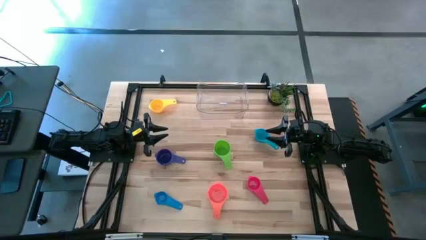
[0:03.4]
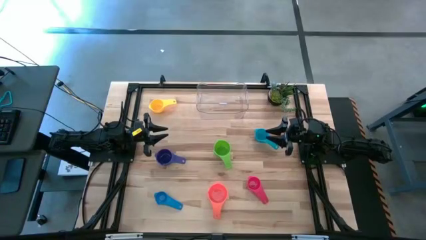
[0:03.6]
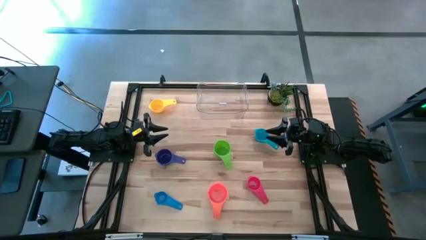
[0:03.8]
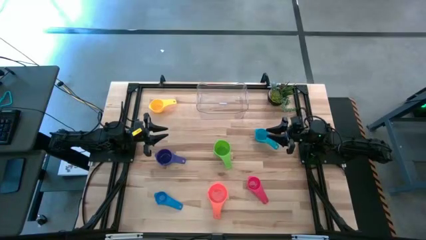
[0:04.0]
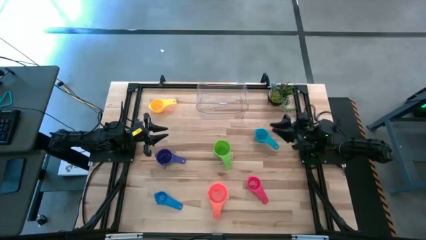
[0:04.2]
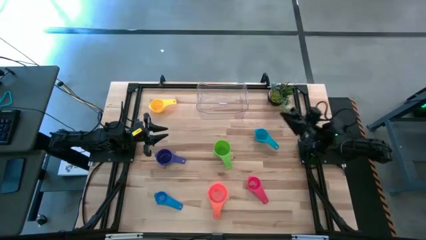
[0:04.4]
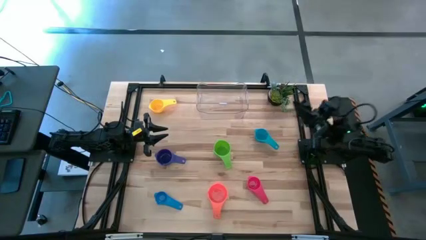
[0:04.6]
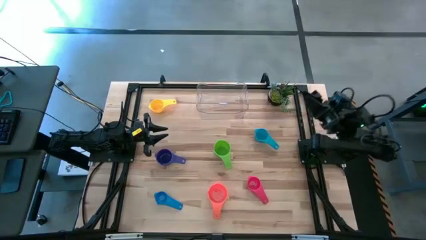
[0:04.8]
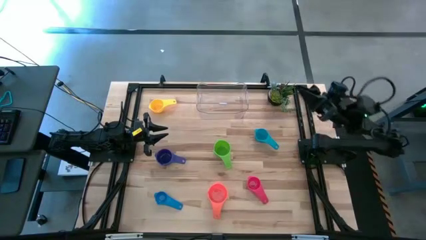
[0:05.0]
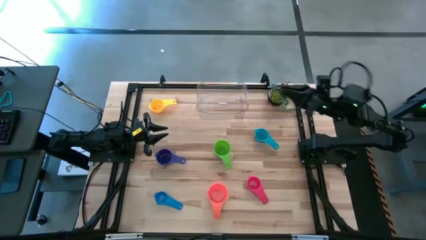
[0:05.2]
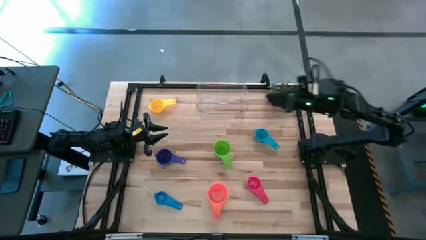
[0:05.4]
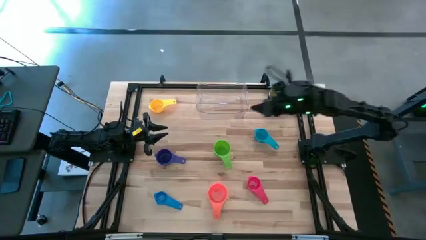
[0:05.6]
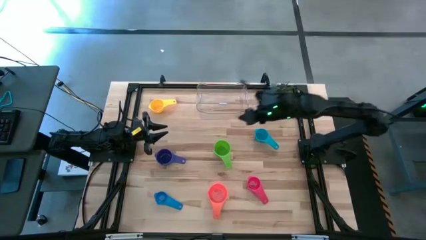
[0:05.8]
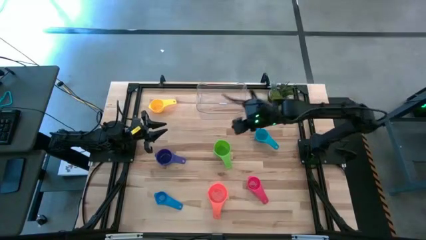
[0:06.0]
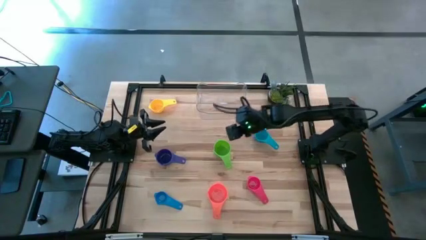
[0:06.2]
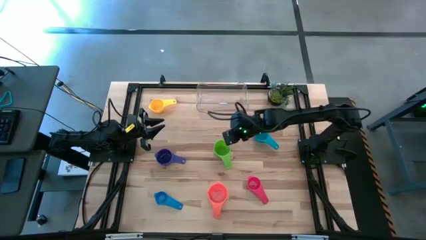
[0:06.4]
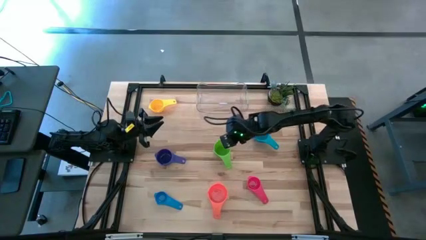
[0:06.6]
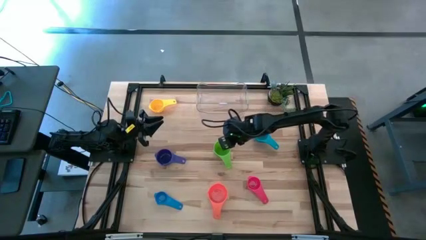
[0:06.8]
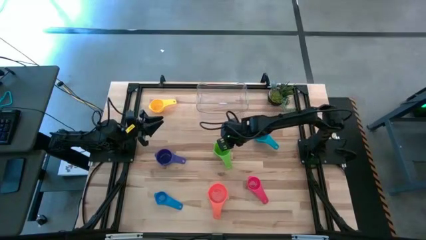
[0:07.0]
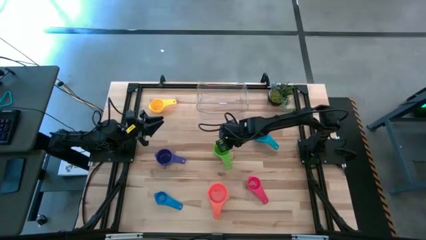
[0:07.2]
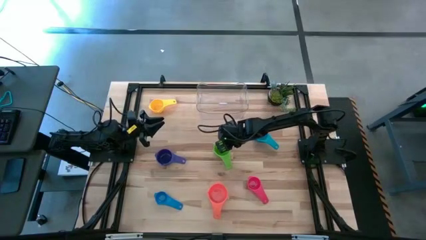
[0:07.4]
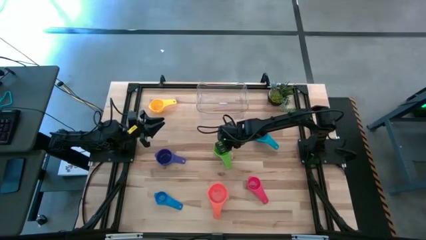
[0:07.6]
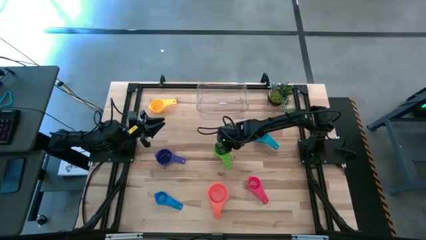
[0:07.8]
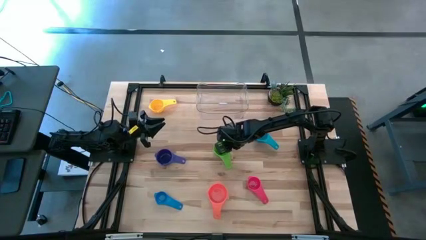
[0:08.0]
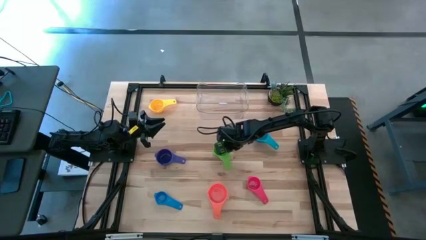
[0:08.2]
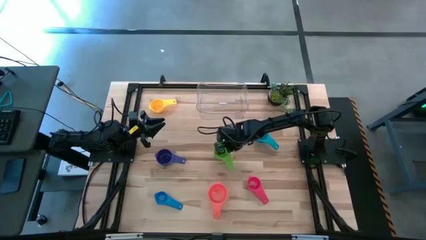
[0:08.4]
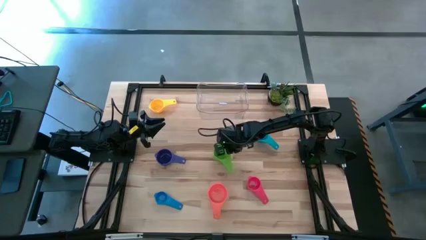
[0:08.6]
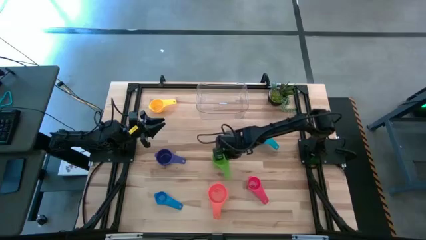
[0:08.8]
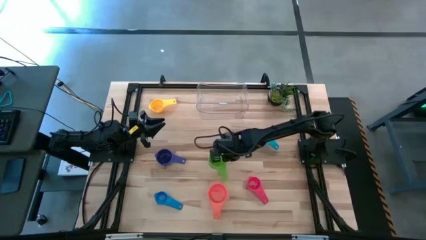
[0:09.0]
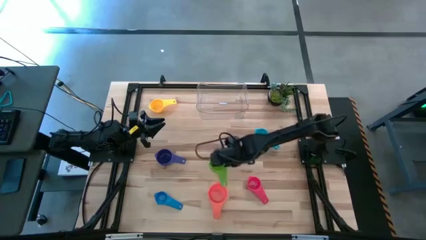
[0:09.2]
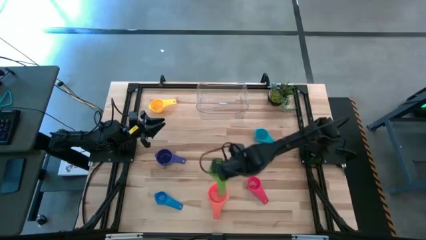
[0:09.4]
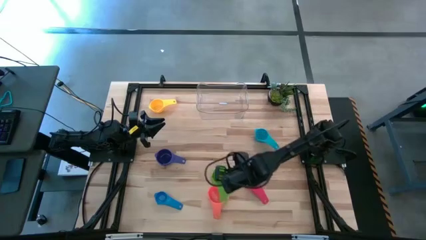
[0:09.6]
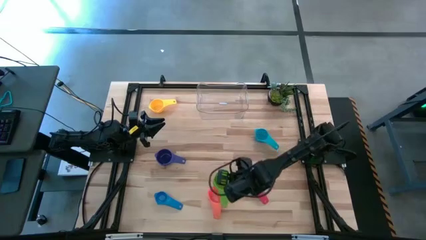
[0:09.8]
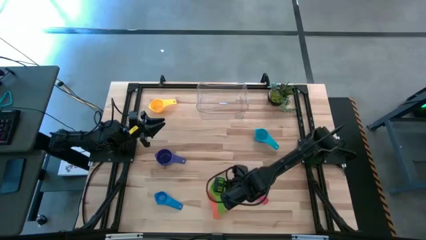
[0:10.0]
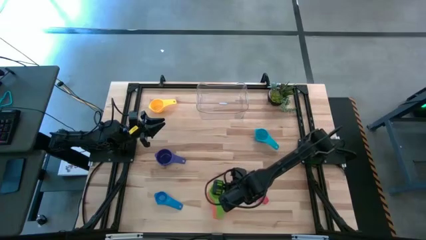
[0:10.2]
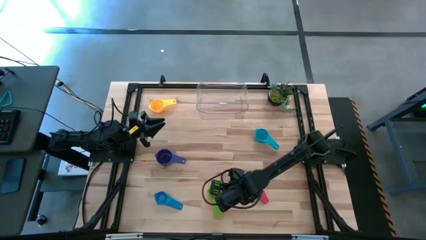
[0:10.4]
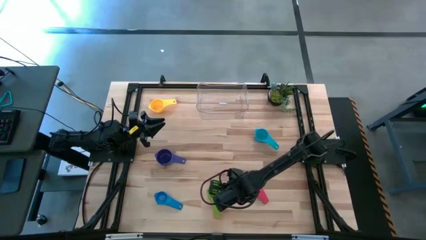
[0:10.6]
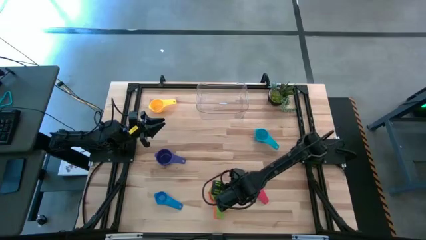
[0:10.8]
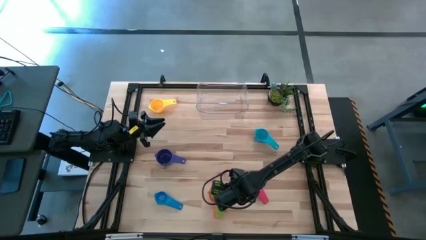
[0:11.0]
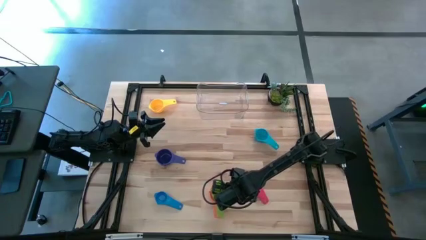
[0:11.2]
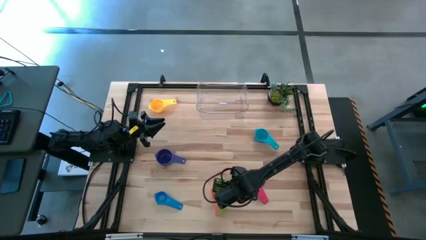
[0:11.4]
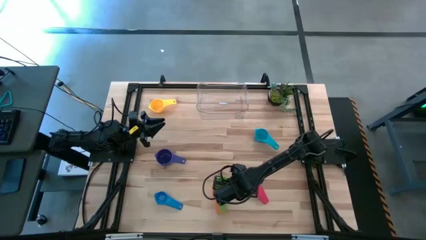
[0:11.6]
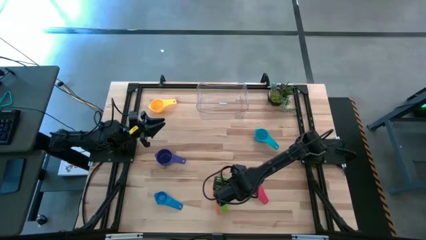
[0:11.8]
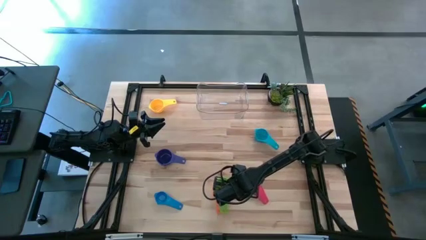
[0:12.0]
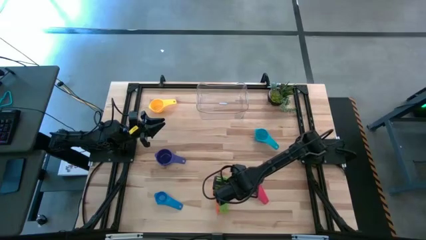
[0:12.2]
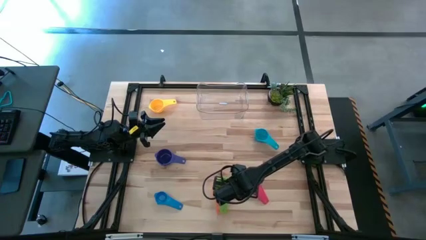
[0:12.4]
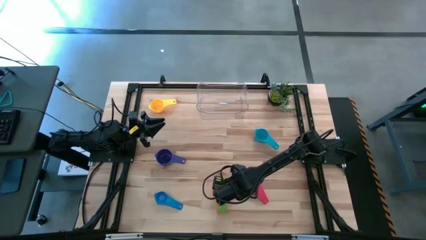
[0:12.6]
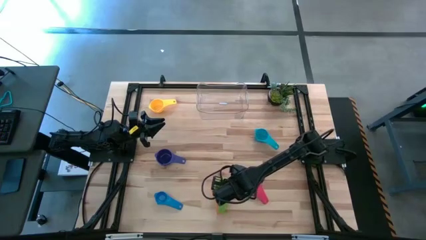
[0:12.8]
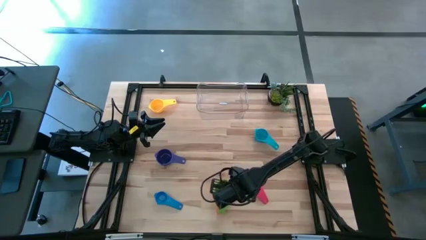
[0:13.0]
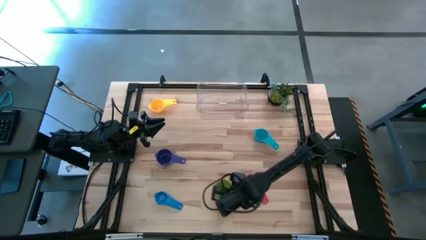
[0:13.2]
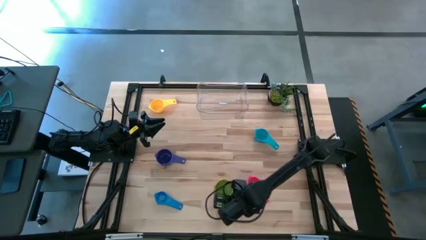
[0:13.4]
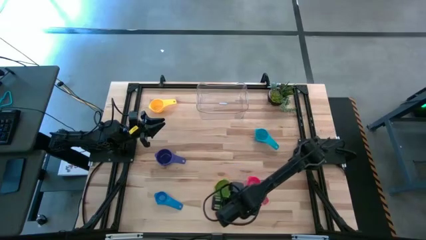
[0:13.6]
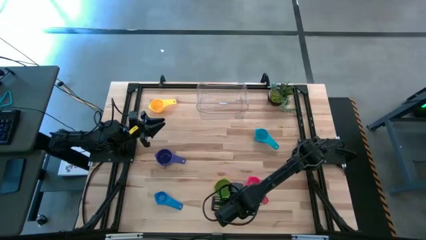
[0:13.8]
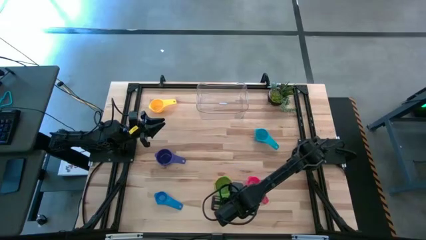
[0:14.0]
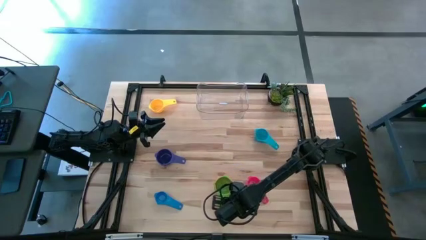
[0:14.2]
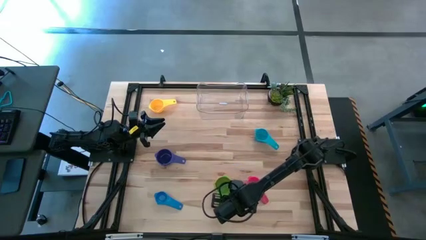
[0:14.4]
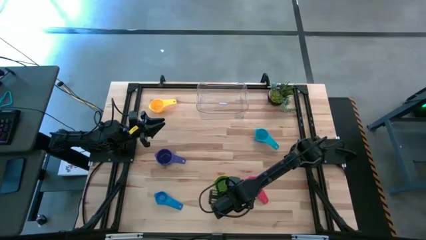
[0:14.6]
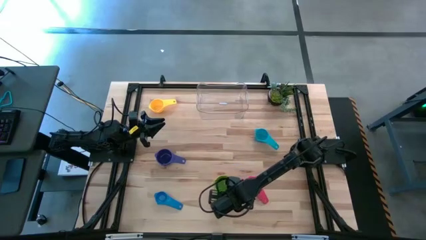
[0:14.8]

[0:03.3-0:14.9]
Task: Nest measuring cups in basket
Stack the green measuring cup on top of the orange measuring cup
